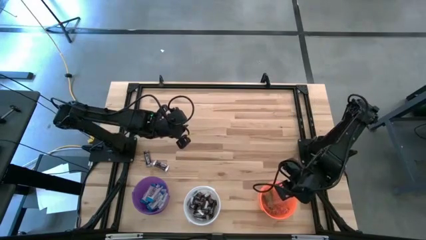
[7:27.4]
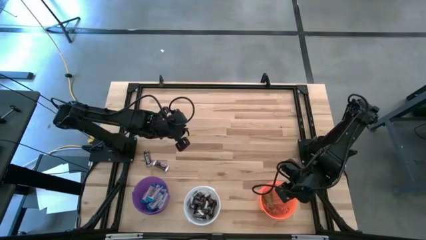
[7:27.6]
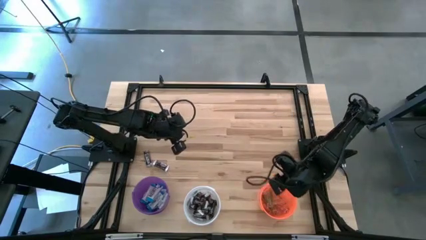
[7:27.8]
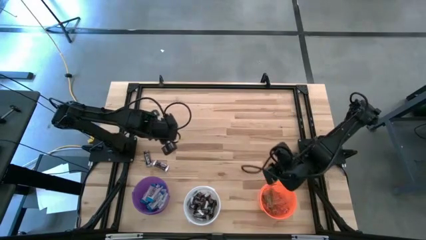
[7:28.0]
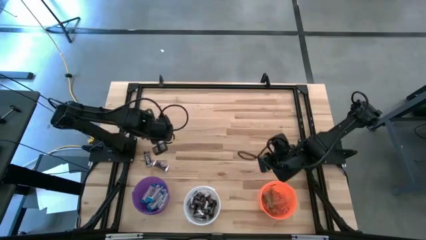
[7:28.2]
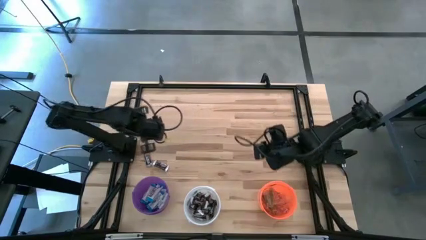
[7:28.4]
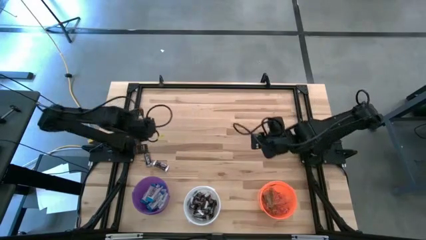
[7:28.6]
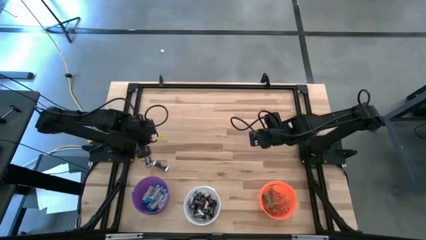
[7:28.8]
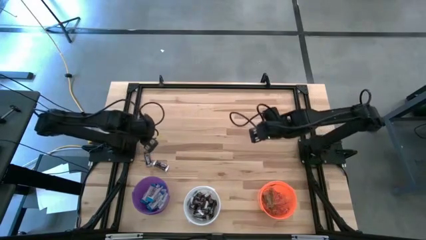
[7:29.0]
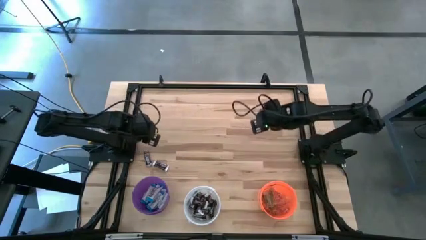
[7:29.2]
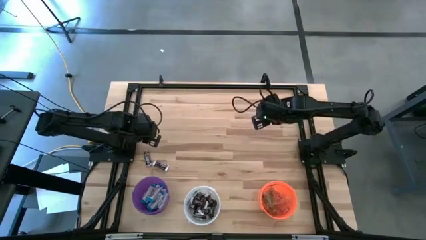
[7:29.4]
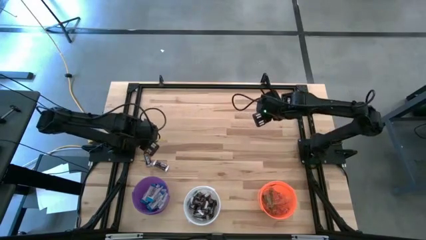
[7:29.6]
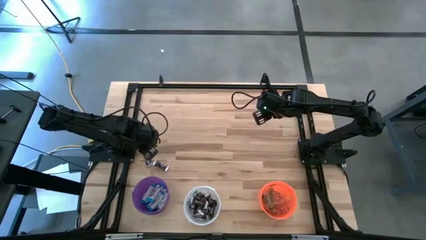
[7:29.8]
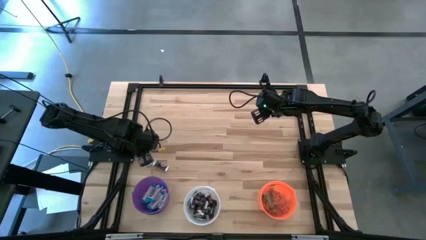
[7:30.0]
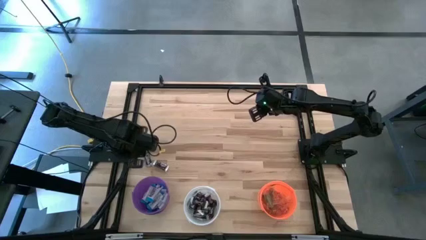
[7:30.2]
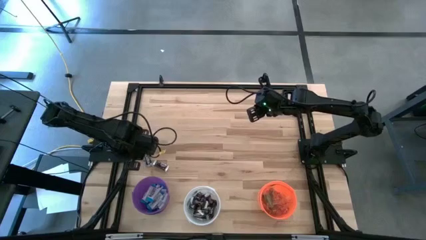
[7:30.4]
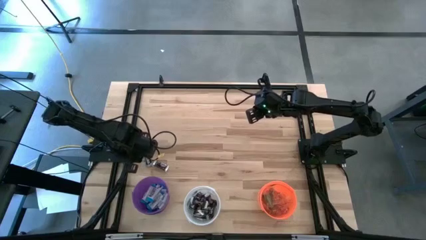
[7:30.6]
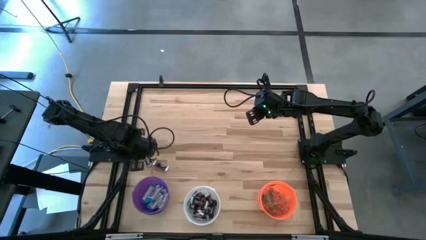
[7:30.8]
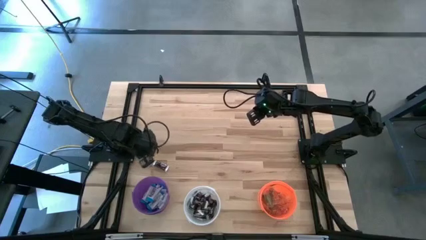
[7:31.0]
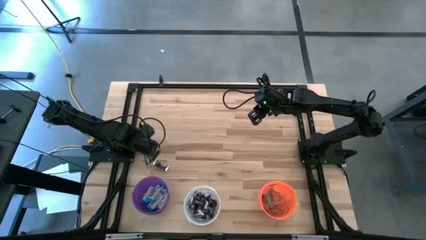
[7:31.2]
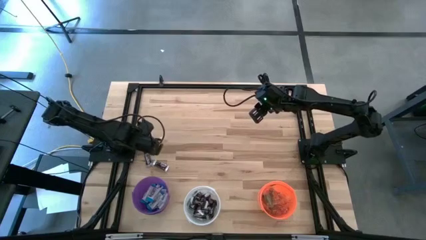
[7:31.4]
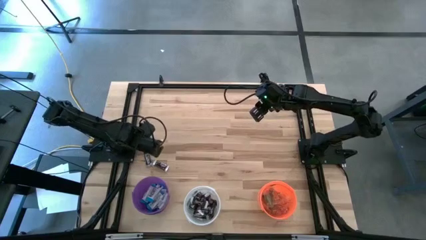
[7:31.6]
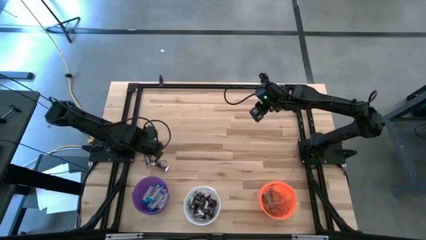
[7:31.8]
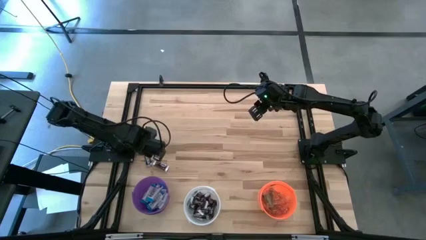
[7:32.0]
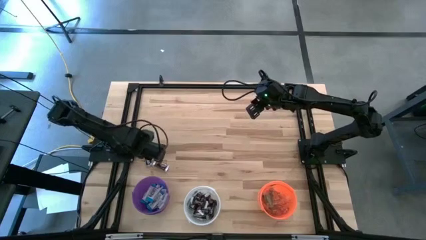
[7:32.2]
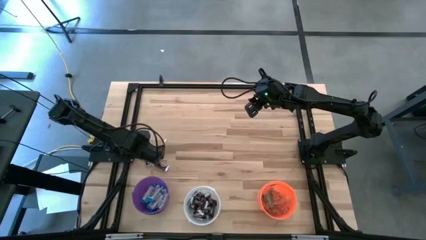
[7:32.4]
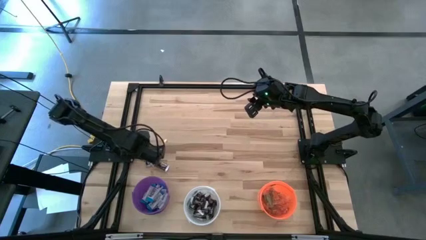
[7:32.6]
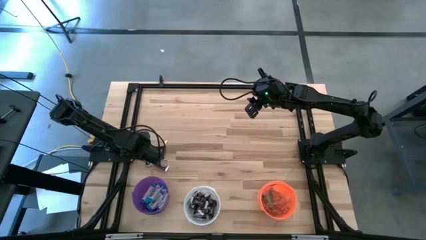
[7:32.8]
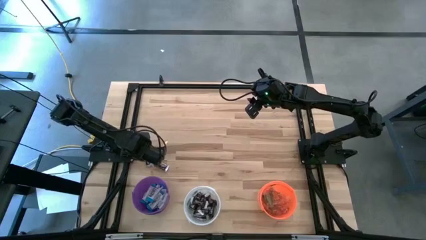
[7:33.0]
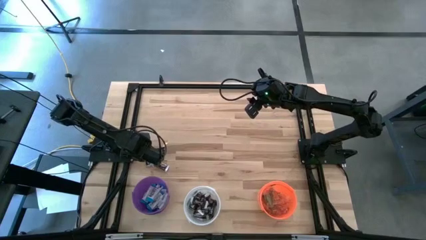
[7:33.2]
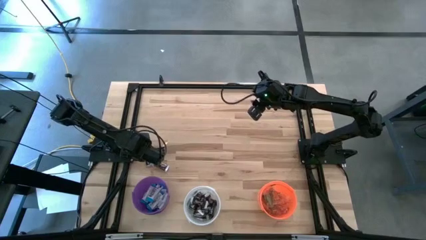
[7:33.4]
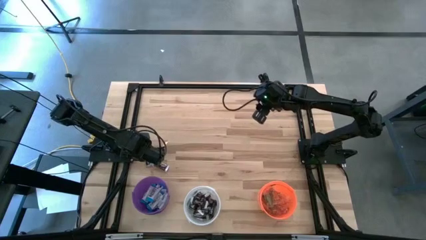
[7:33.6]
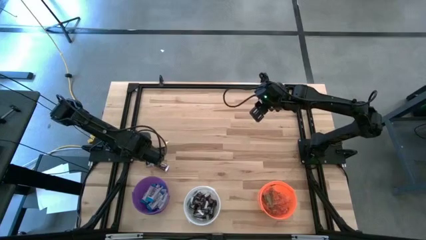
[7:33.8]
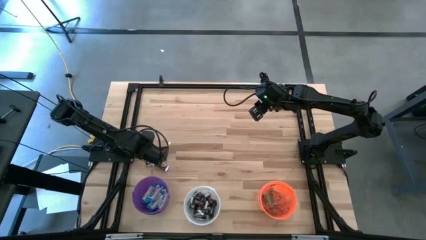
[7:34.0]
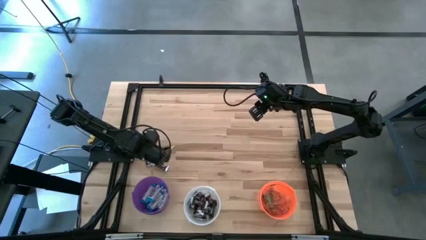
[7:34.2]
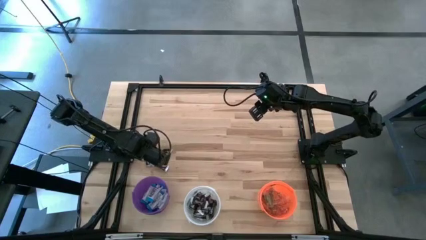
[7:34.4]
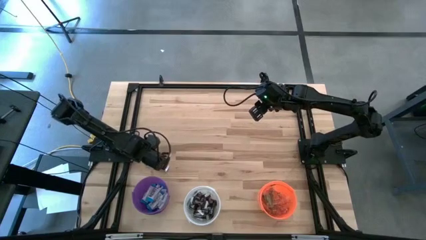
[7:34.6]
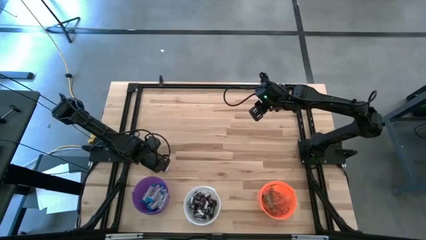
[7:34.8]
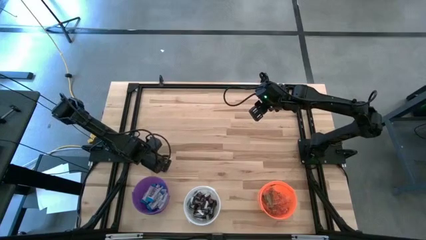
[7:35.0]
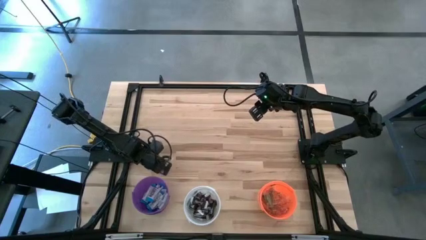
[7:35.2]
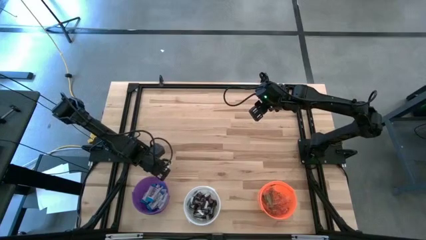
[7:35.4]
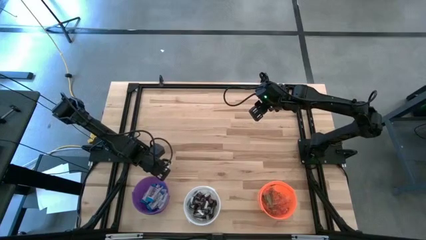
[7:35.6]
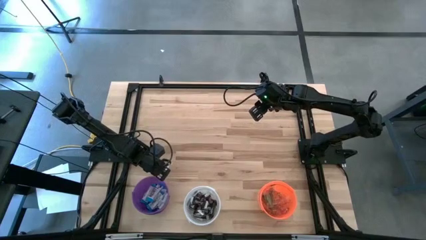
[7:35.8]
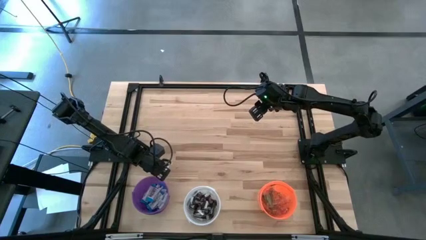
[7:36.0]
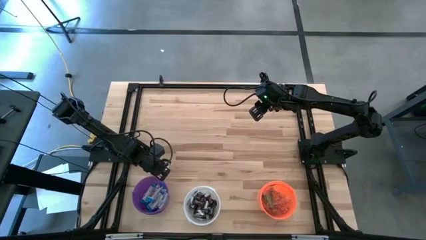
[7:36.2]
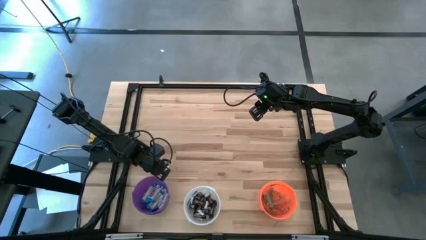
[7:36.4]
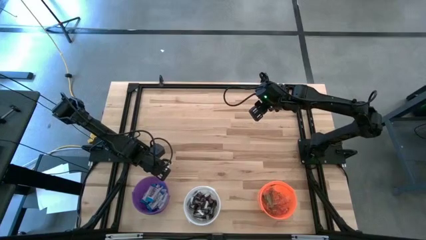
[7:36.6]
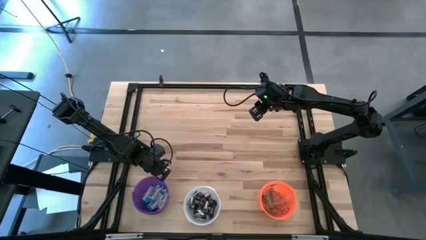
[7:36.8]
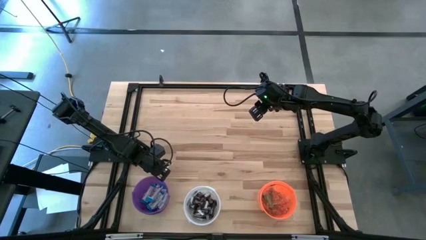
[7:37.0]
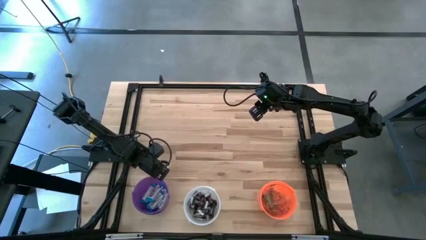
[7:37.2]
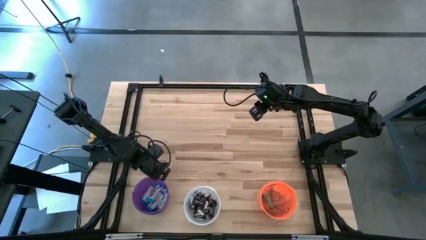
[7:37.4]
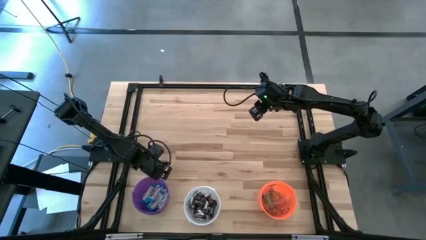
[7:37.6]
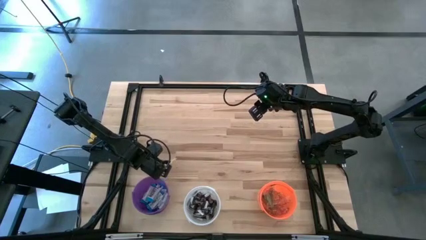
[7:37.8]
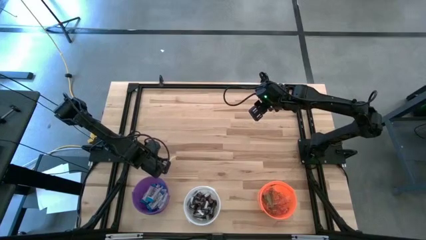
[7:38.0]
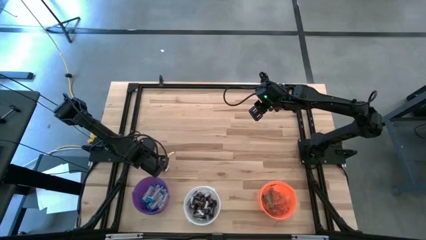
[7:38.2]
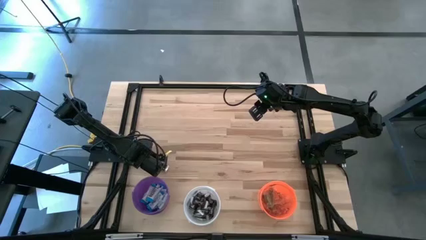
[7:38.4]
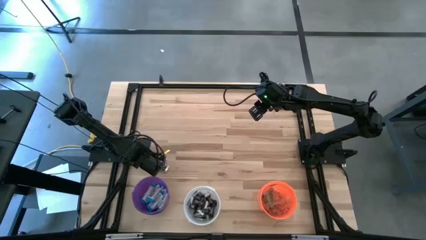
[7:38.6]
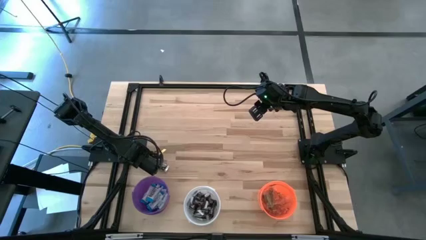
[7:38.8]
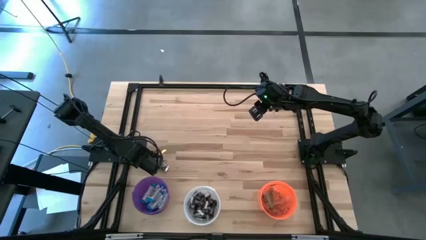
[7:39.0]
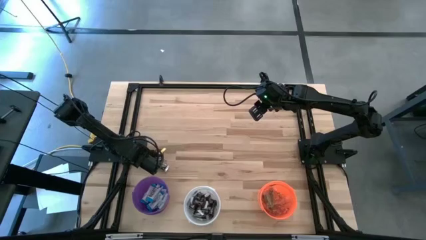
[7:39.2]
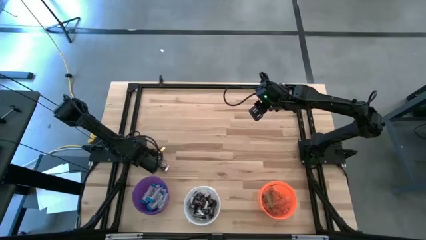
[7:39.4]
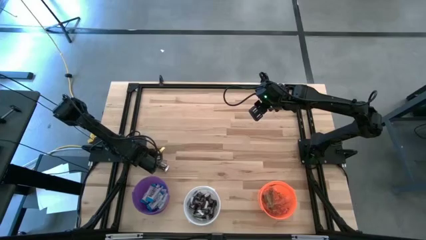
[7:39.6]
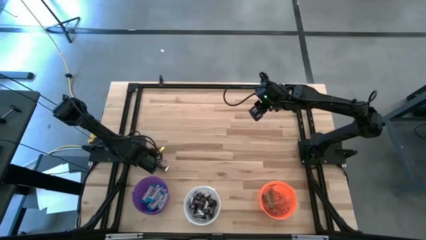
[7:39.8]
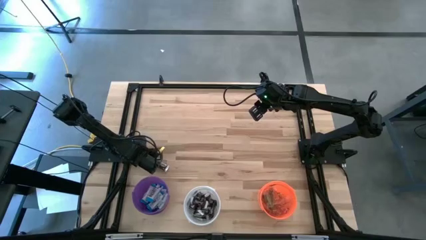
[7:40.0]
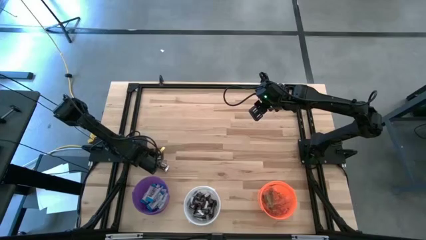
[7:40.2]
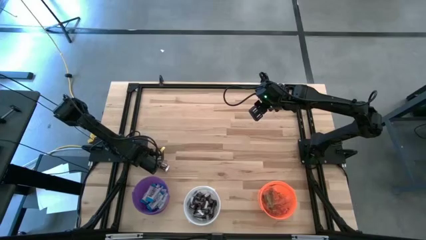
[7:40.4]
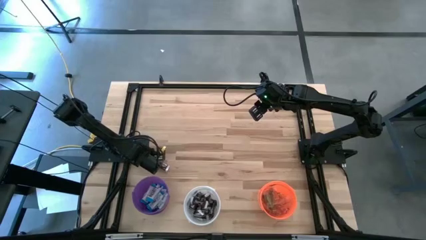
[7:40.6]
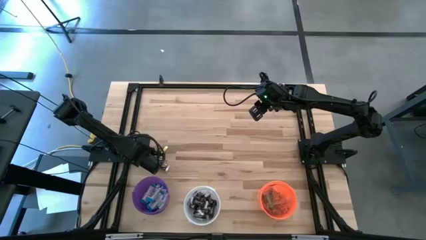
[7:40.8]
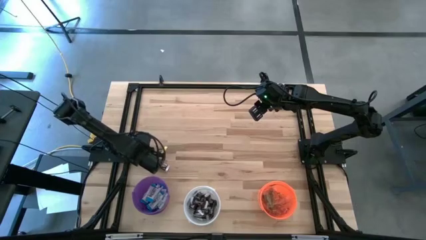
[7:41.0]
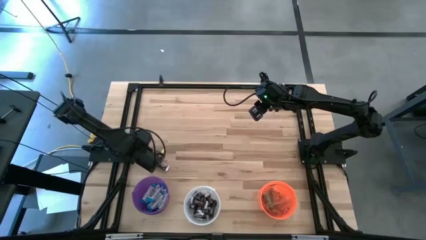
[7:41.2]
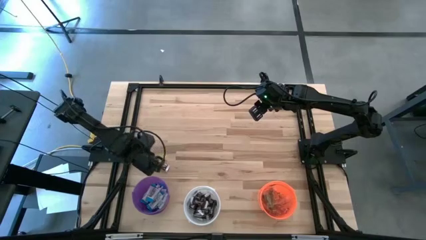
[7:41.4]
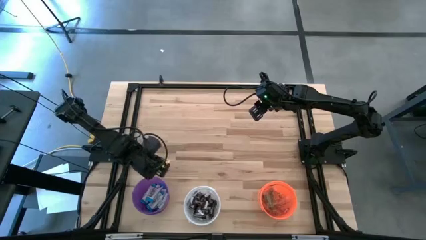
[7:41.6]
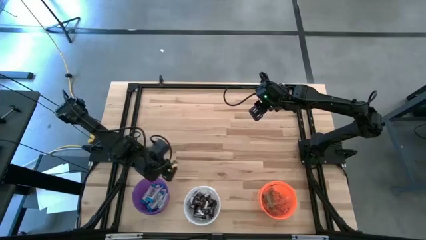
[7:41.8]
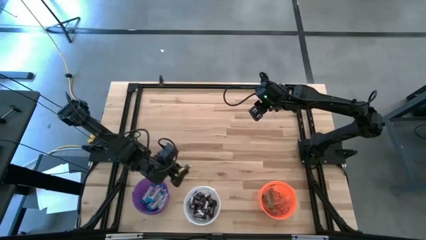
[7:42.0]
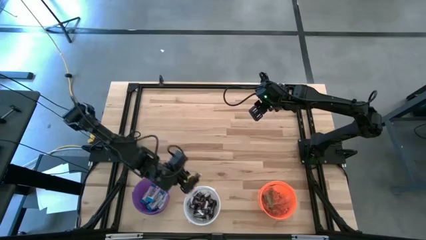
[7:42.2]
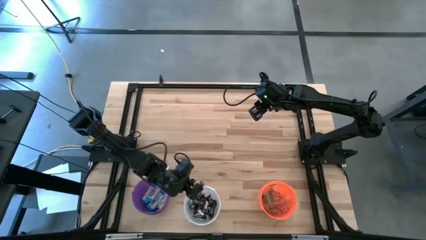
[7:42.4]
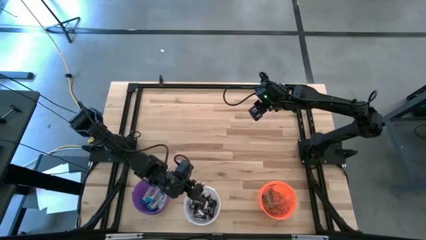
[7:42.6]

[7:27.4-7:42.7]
Task: Sort candy
Put the brown chocolate into the white bucket
